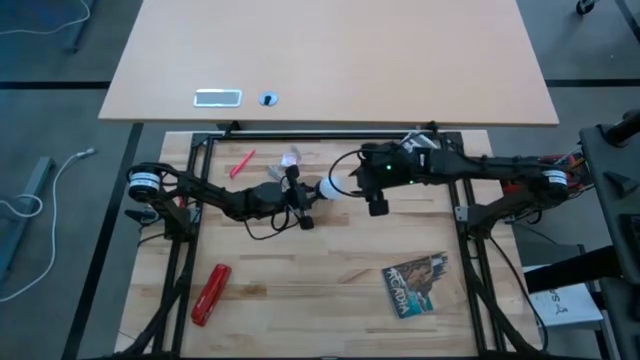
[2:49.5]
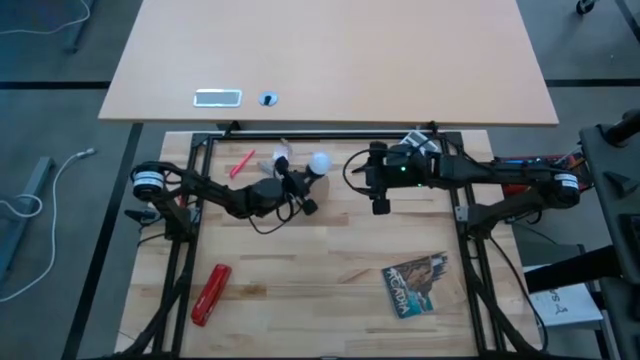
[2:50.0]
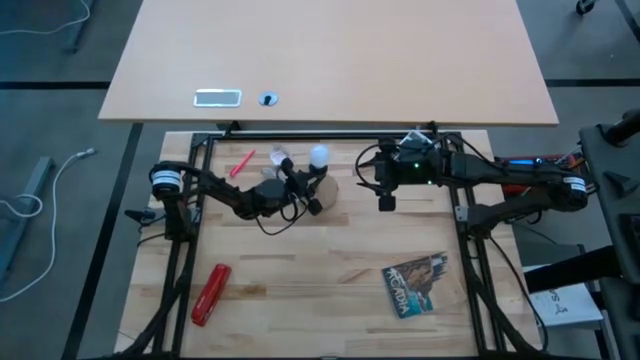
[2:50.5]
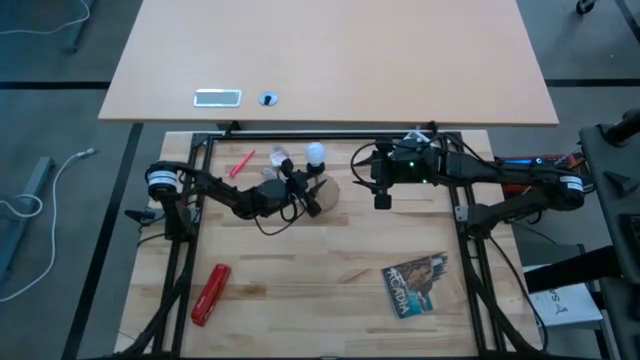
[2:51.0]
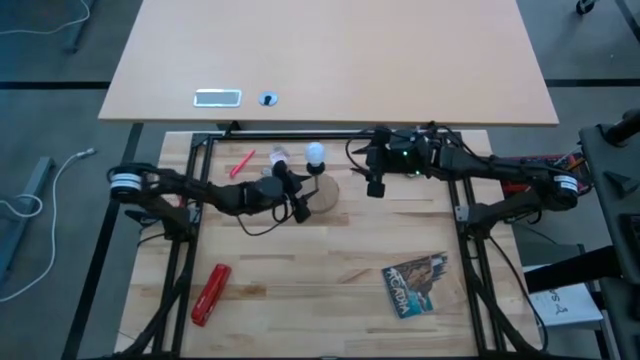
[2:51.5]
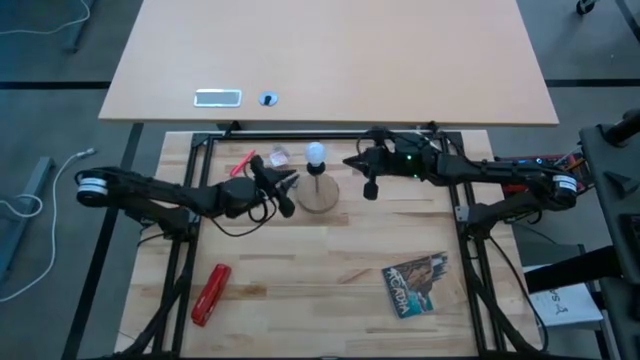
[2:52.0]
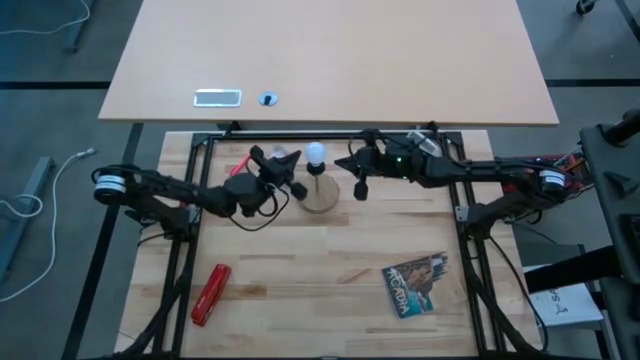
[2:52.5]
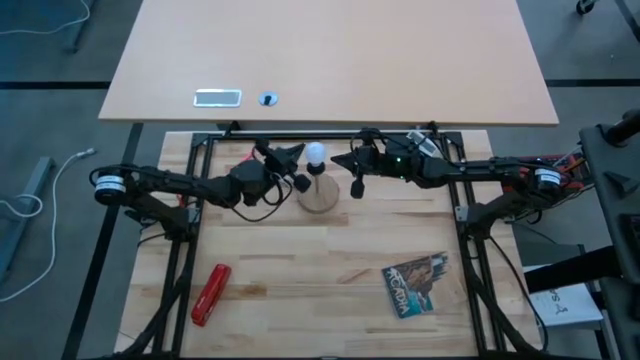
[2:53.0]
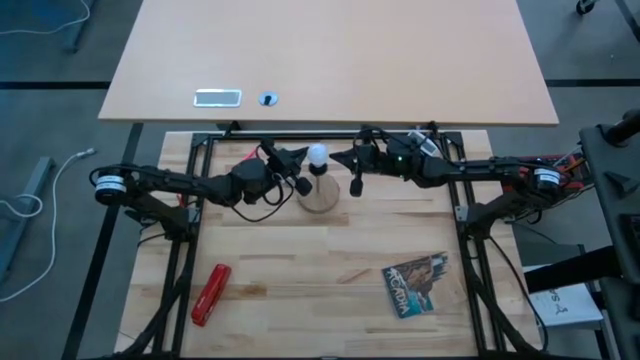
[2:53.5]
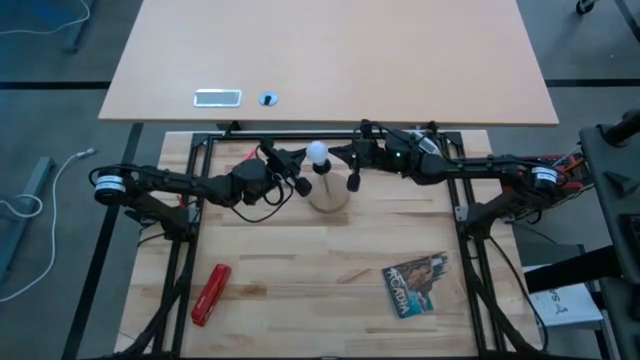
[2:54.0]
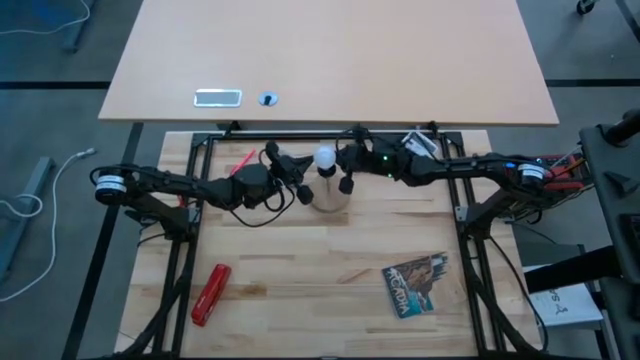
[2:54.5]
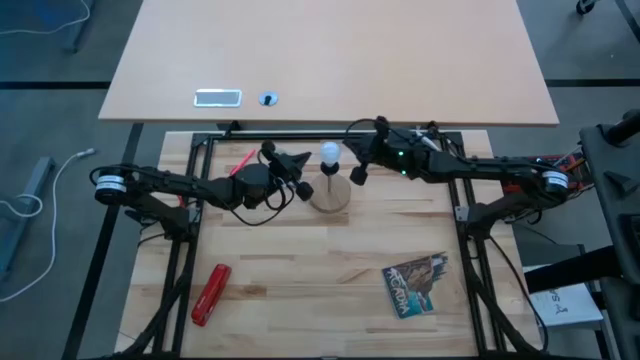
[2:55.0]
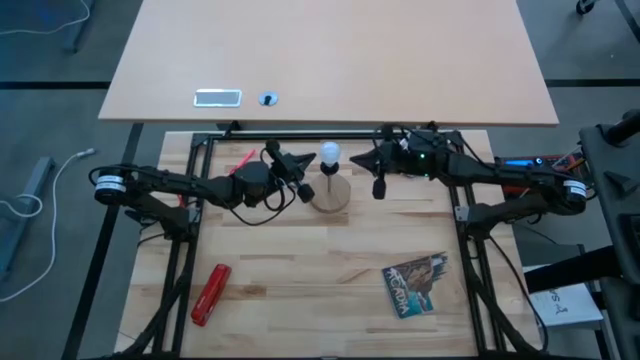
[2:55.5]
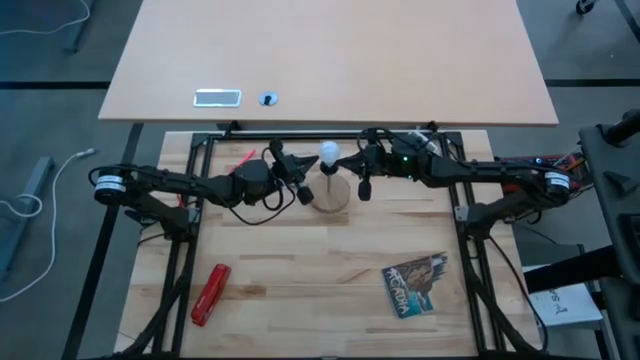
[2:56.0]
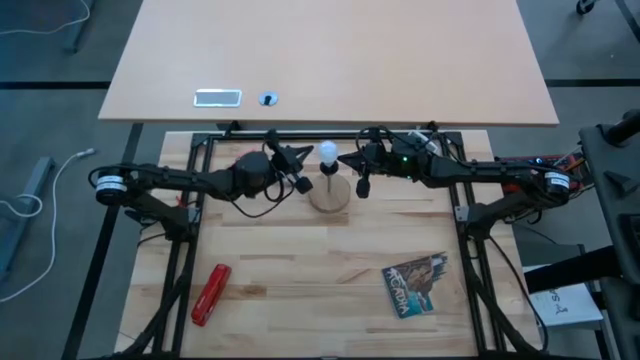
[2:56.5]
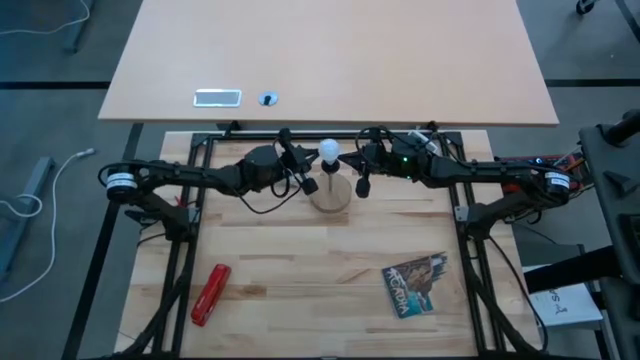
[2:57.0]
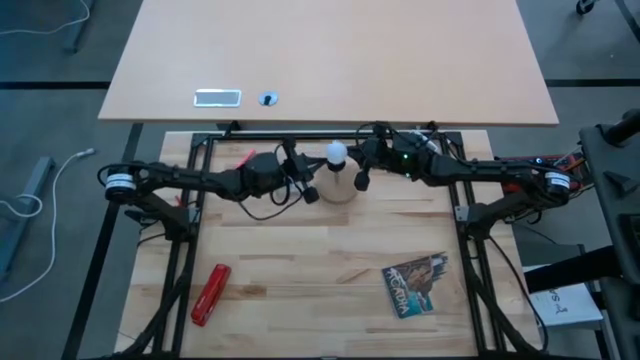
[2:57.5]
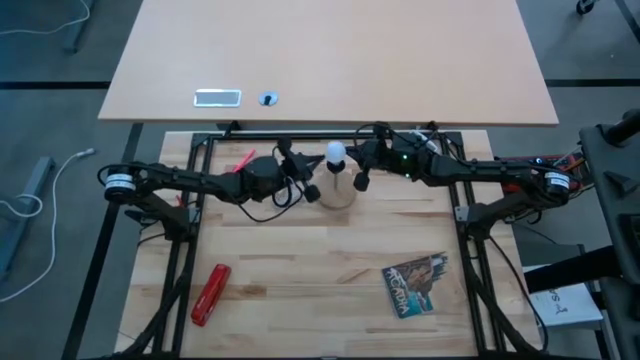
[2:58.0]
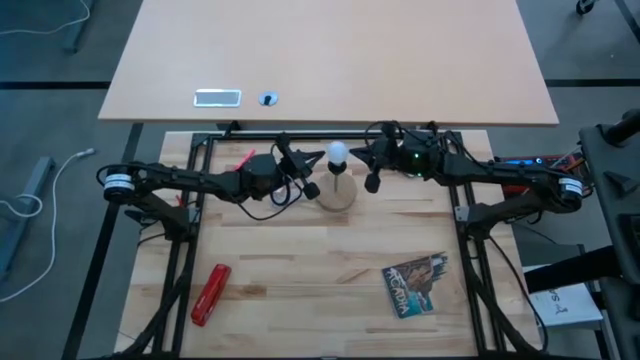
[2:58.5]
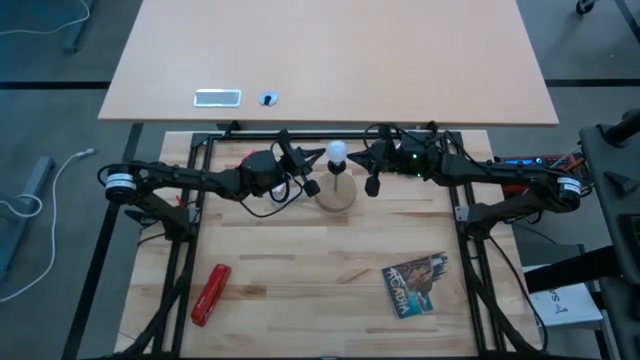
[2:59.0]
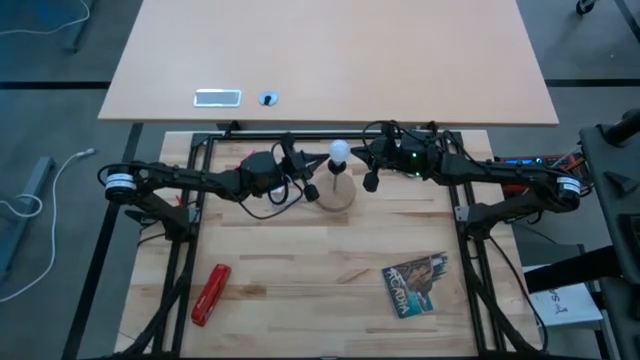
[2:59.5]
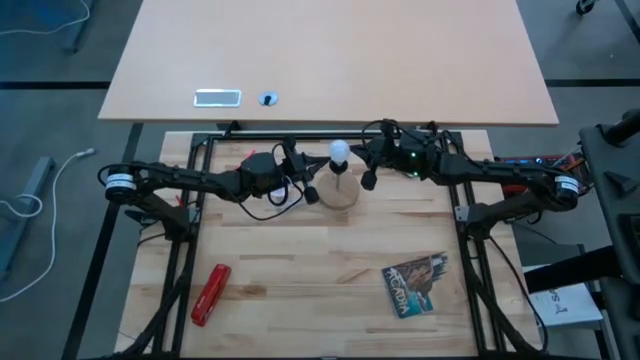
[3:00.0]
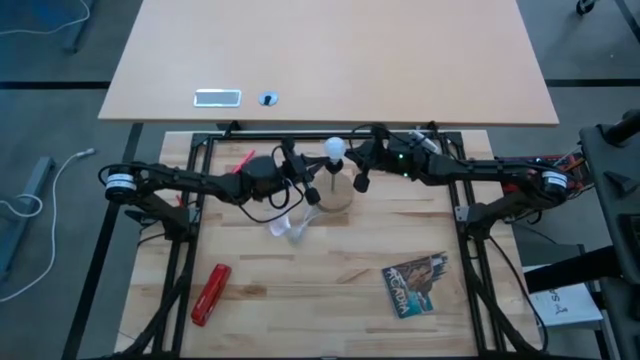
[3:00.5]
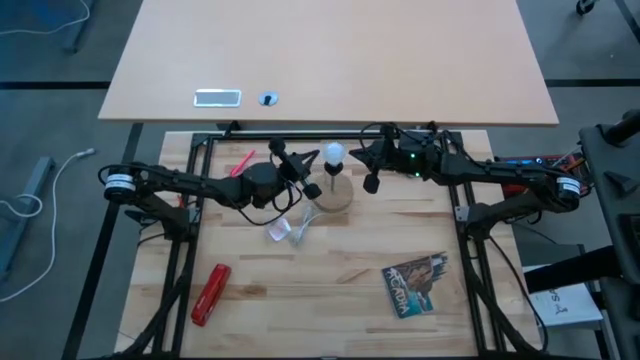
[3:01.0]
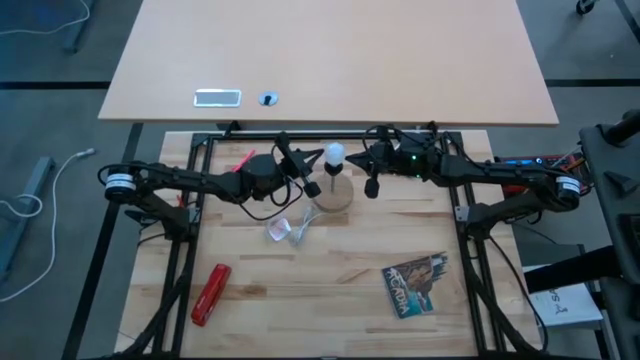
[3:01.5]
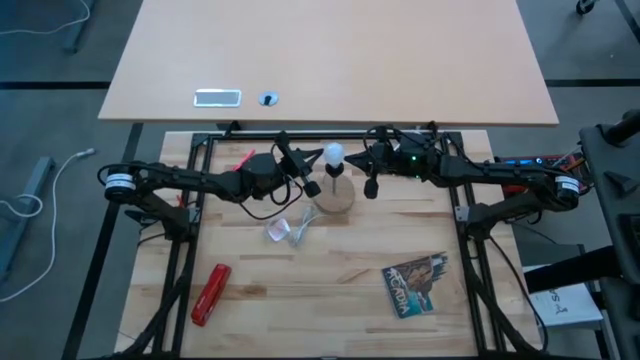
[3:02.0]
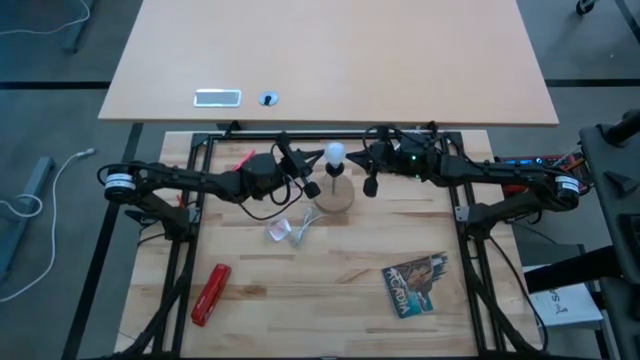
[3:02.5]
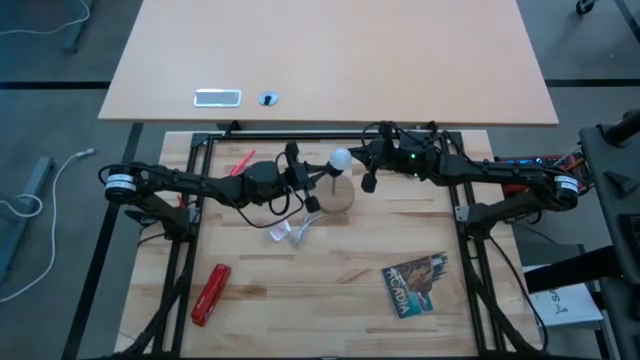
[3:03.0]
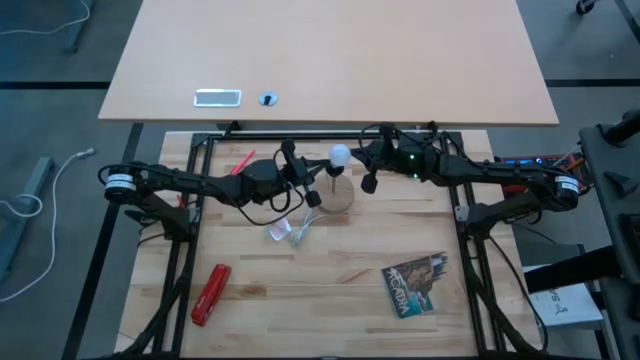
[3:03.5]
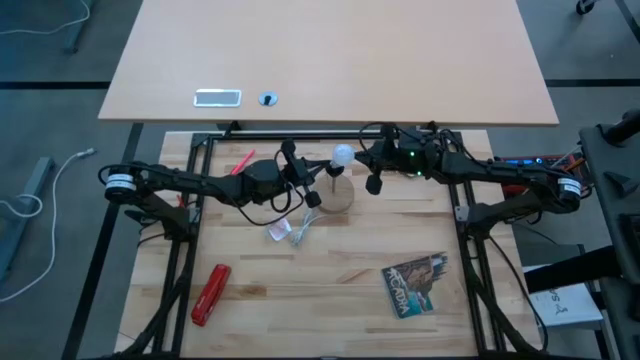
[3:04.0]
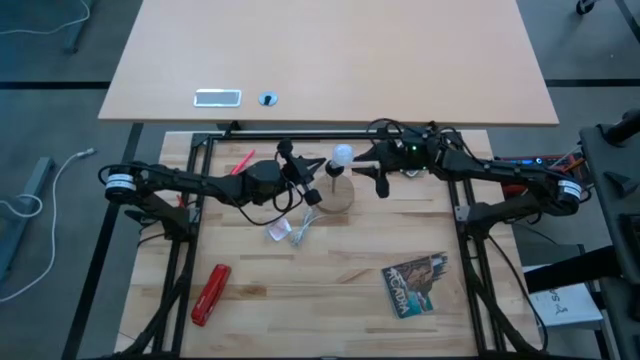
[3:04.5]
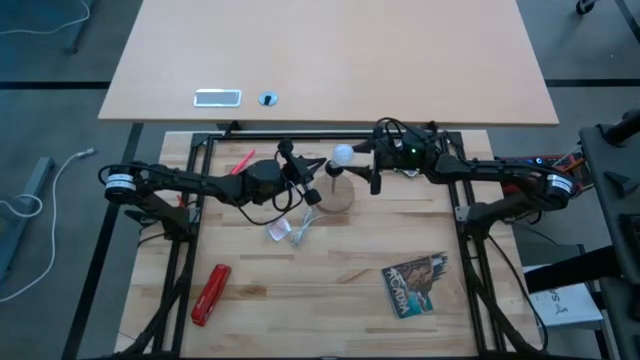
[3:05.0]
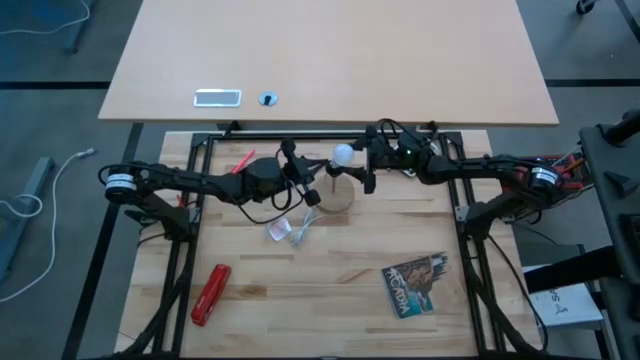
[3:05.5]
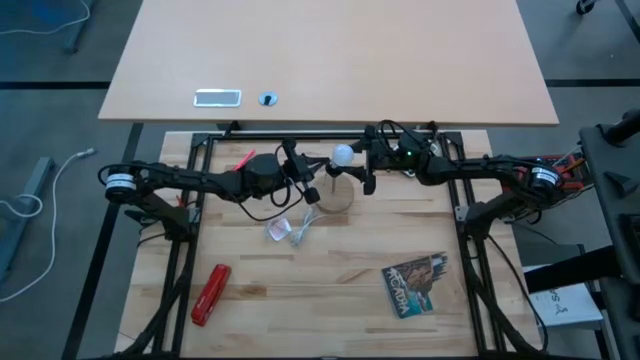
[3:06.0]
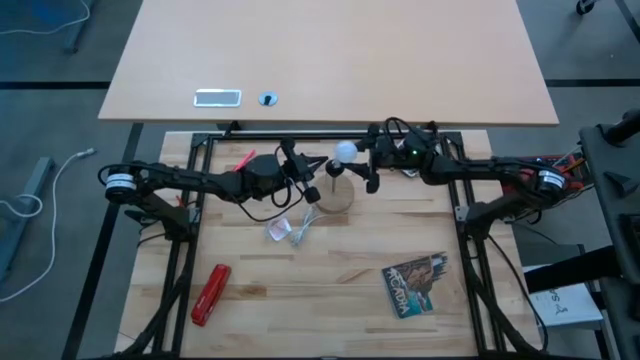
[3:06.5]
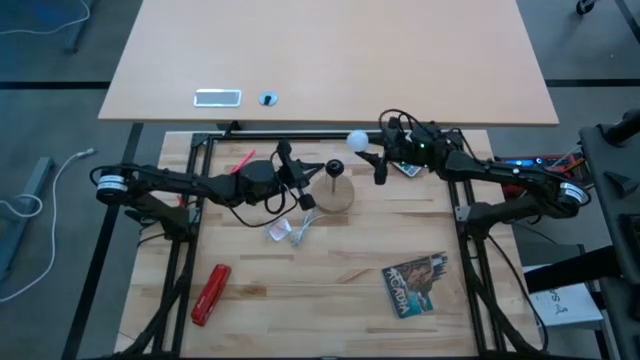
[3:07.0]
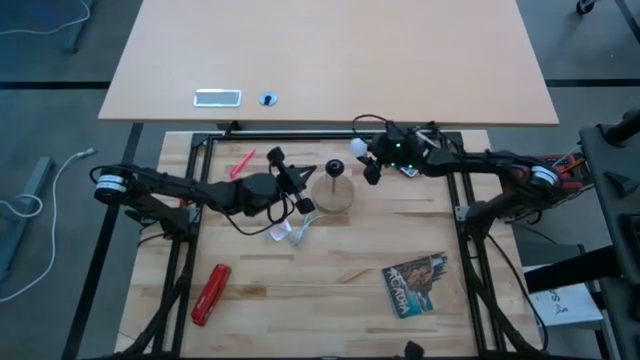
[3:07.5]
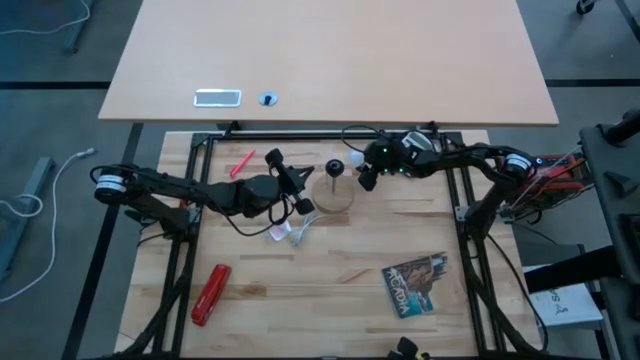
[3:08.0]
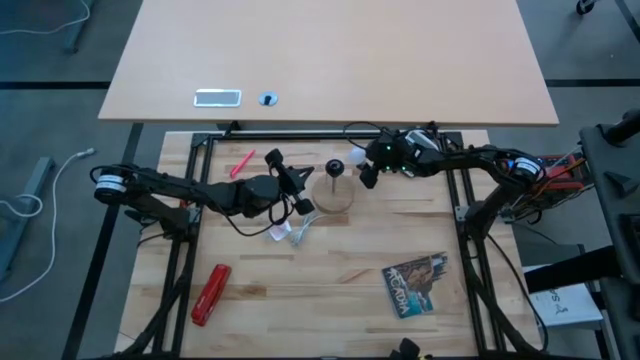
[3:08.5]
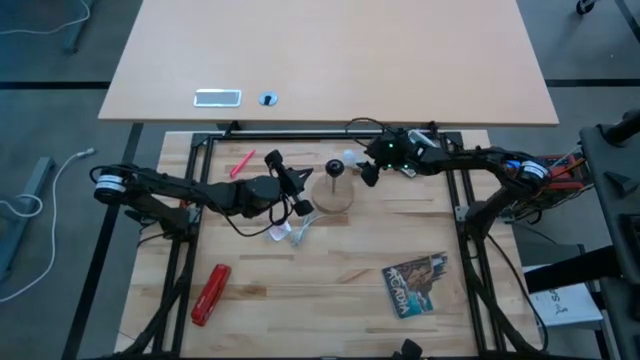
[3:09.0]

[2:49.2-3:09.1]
Task: Screw lightbulb
Remove the lightbulb from the lamp
